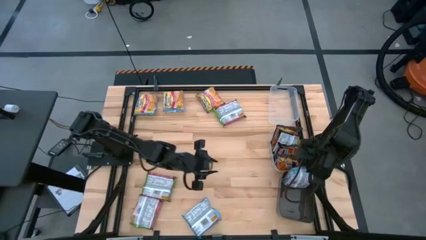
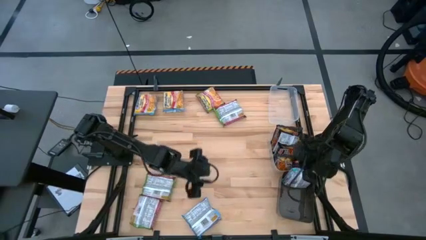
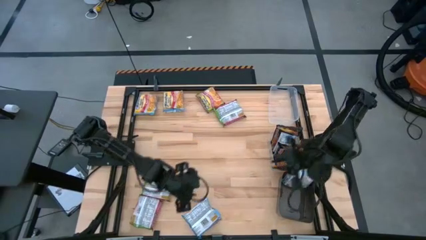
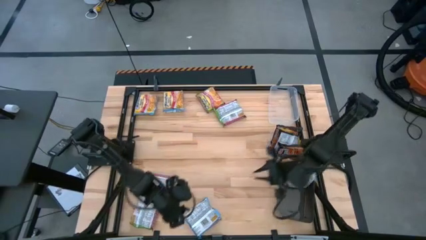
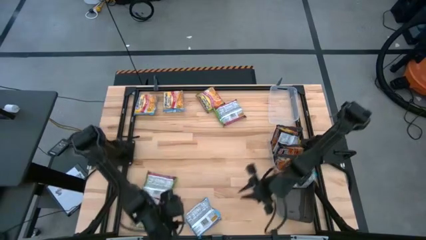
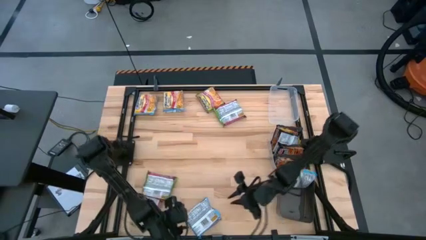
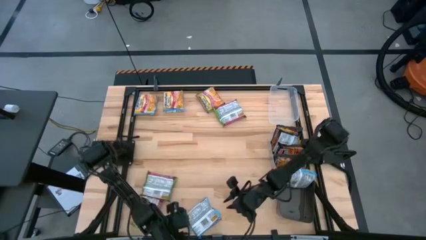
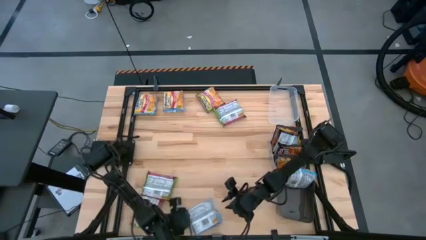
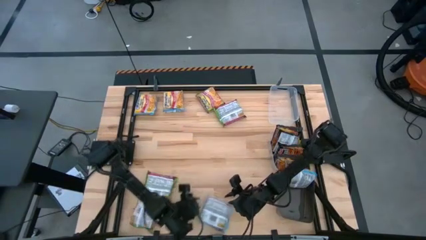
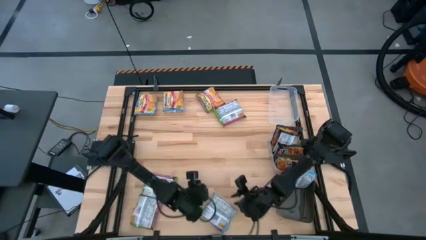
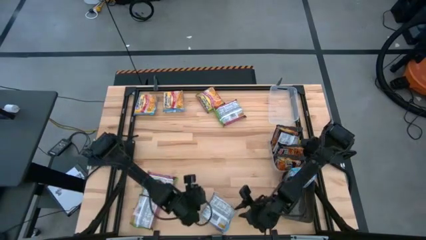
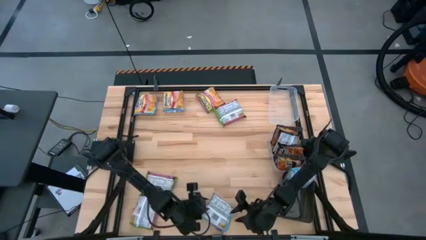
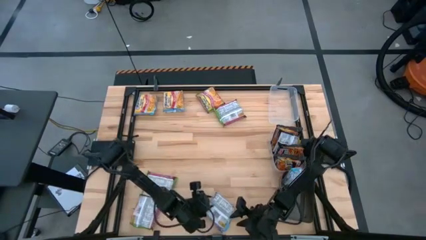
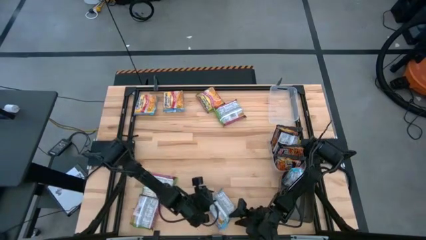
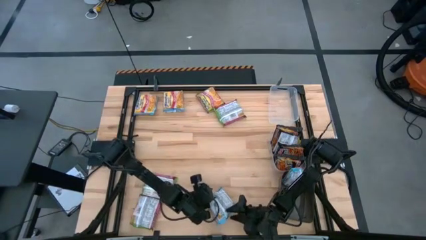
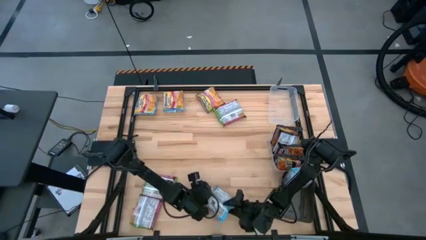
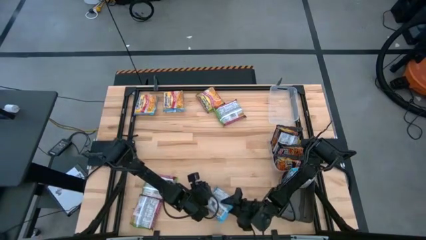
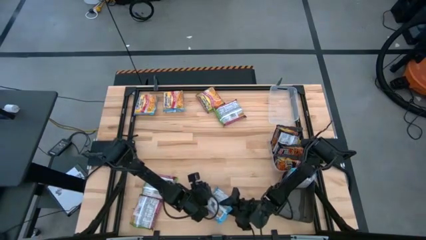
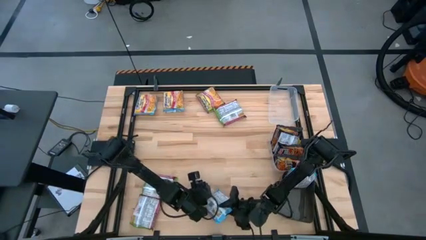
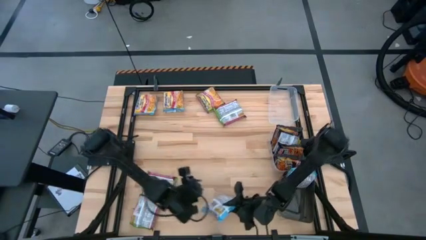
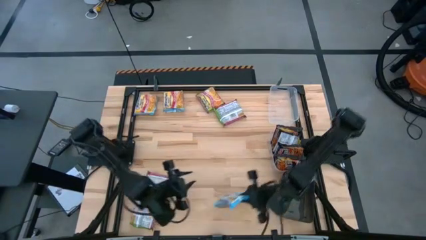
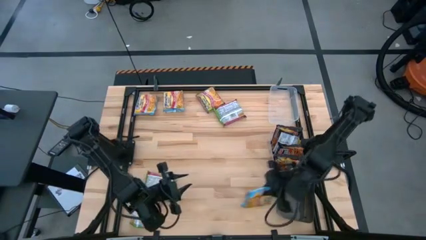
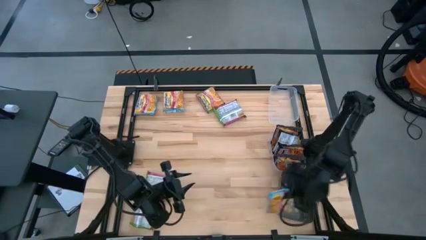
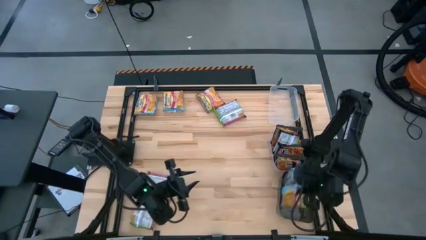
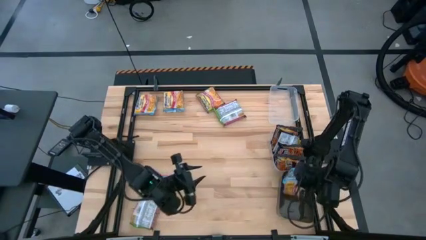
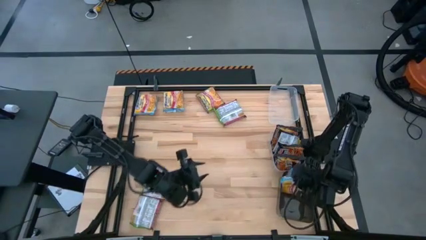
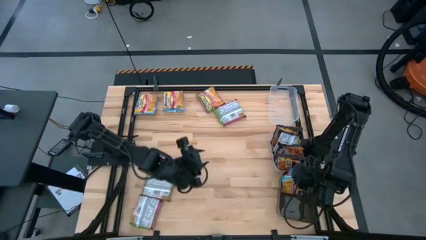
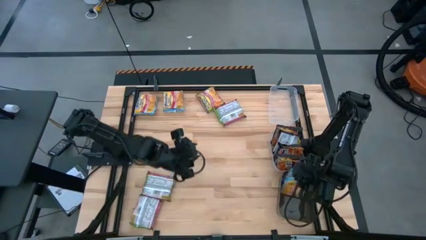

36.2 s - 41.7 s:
Task: Sort Maruchan noodles
Put the blue noodle pack into the black bin

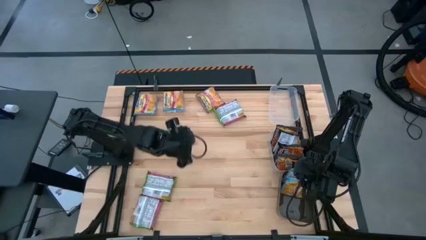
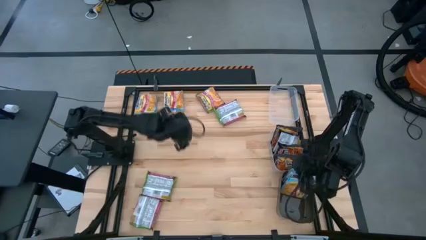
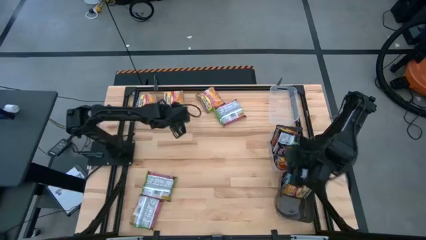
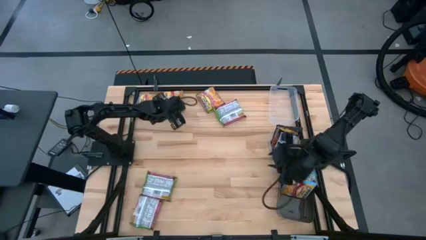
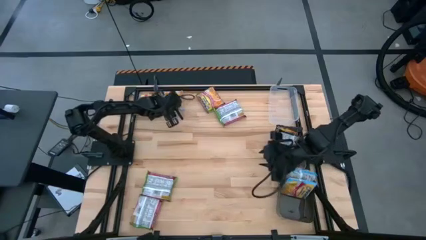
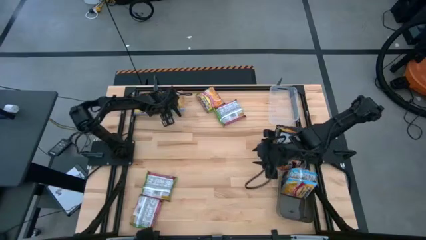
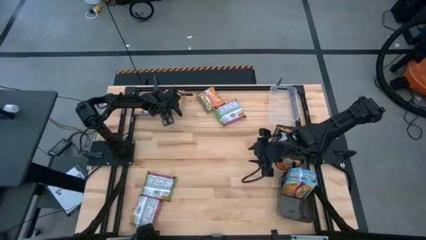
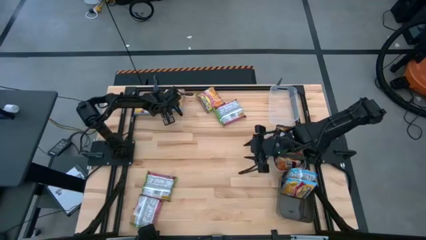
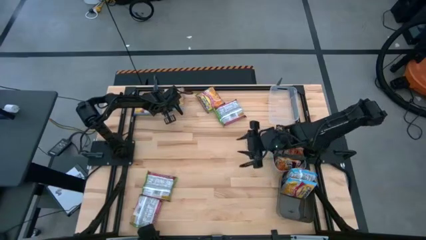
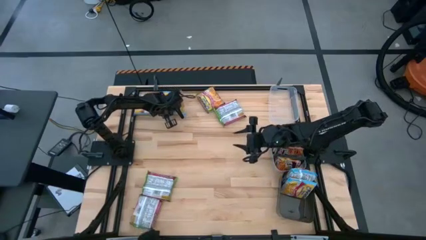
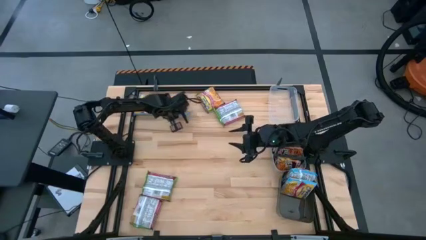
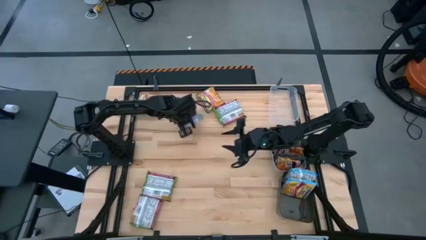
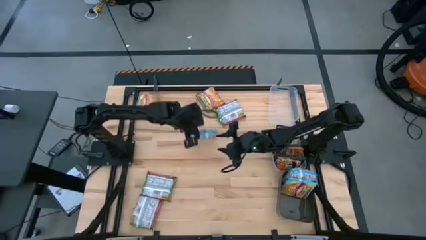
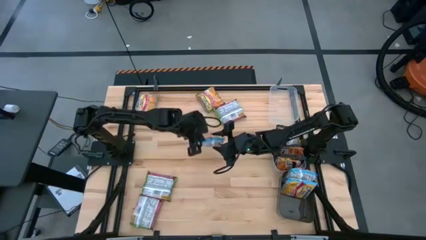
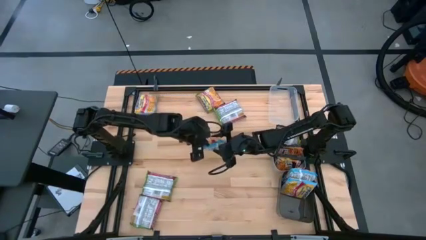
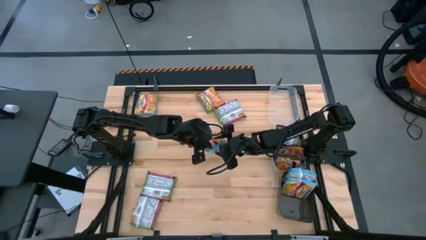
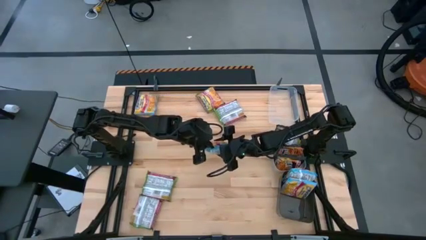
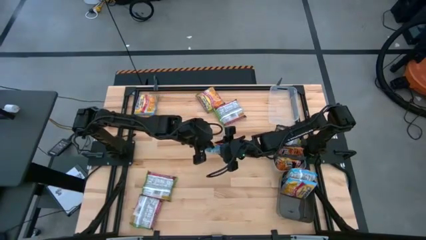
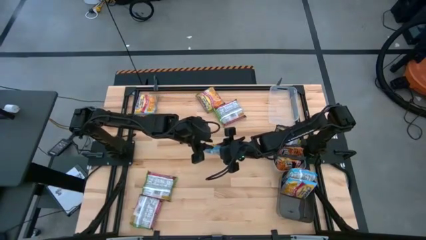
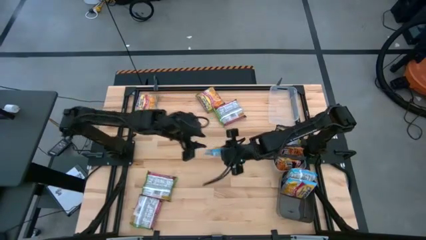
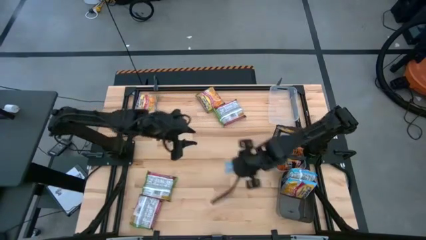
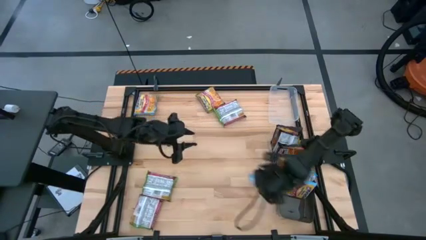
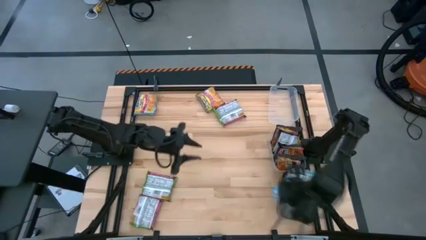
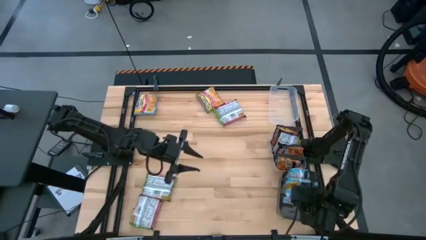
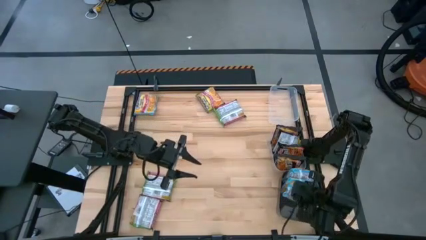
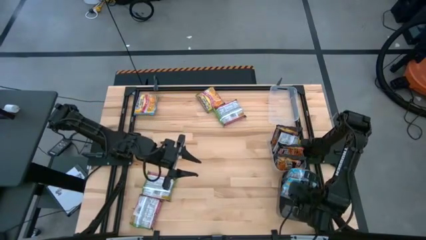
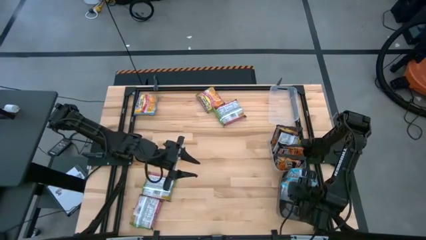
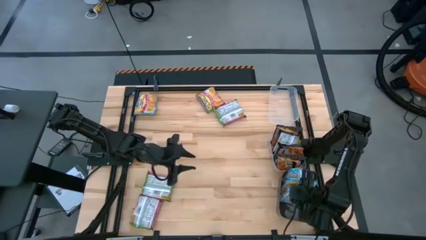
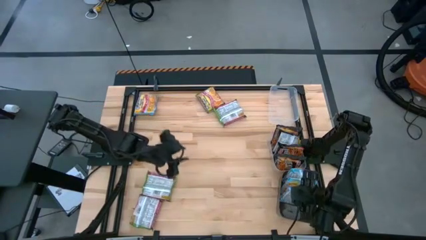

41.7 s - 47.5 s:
Put the blue noodle pack into the black bin

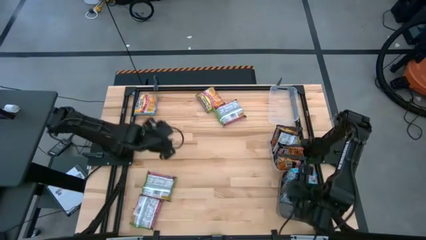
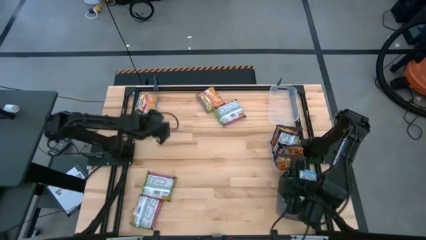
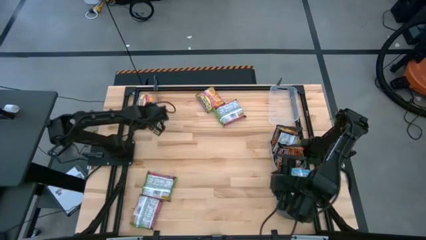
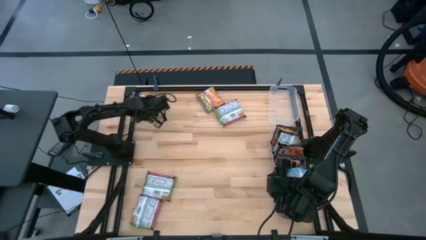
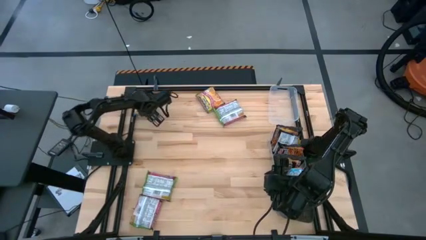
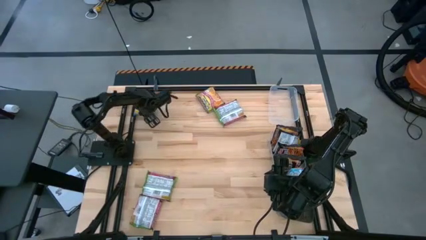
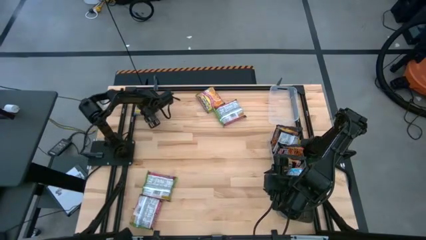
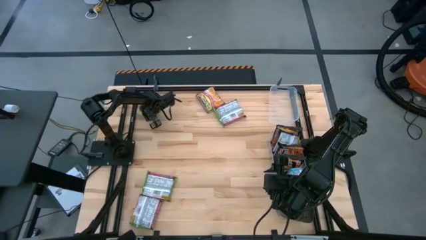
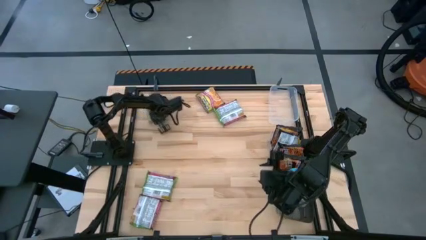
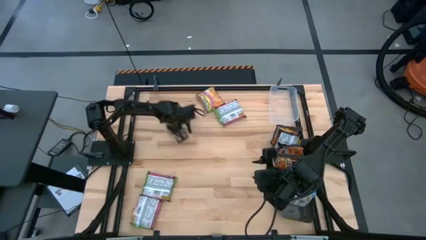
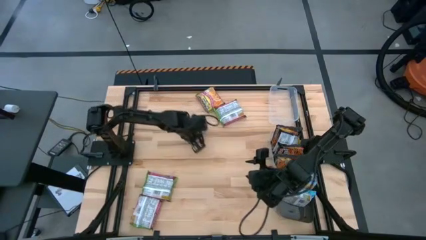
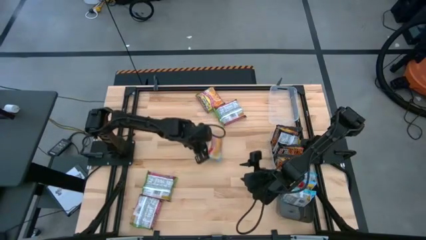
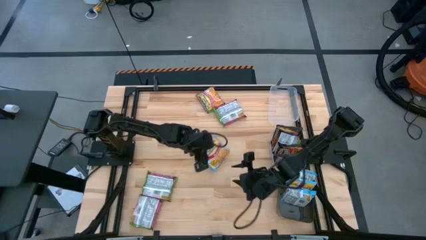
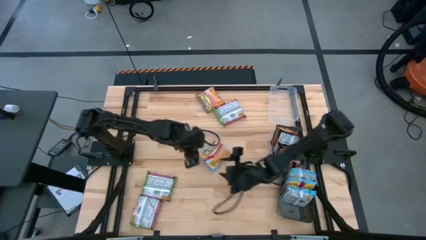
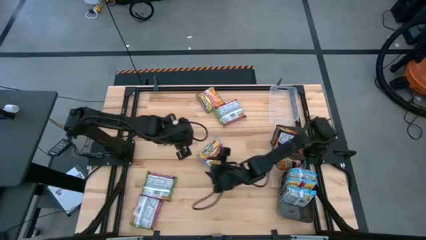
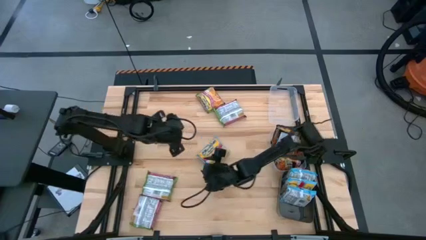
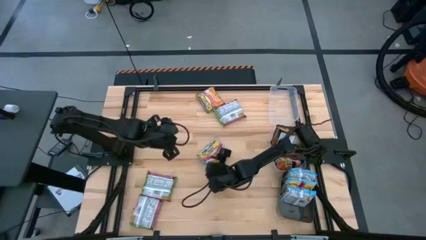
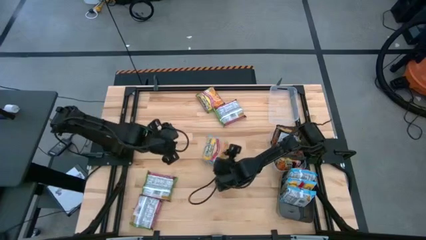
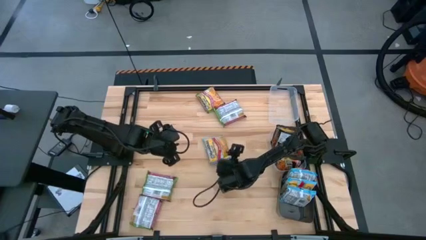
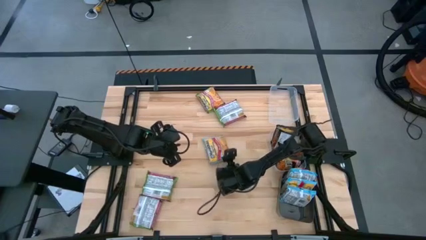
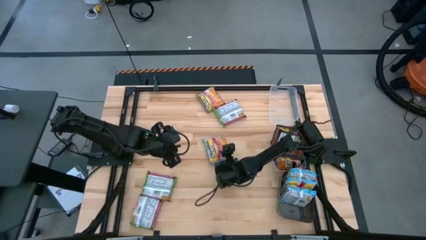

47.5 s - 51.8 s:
Put the blue noodle pack into the black bin

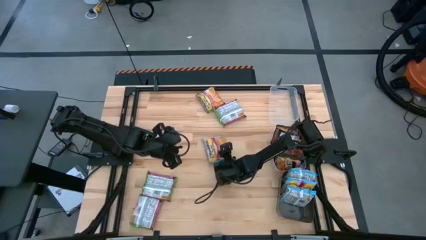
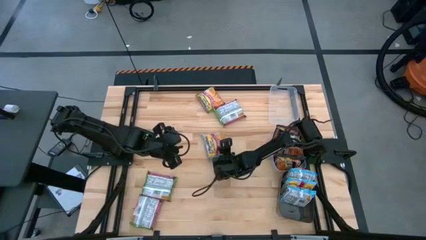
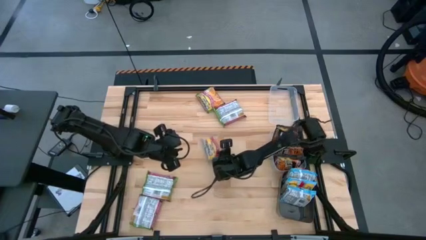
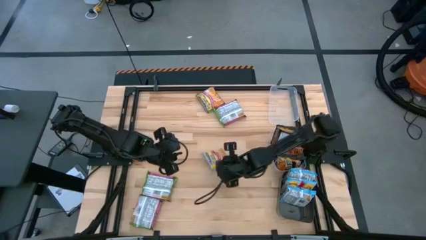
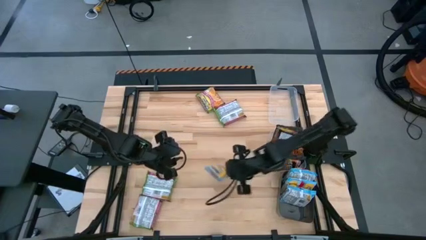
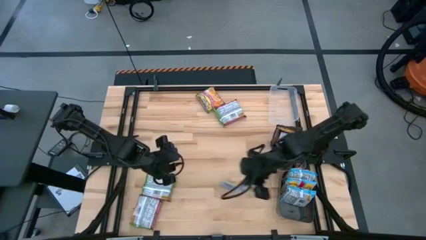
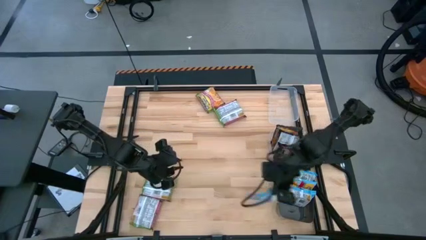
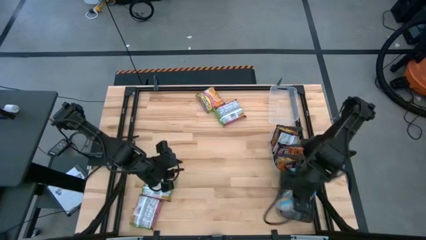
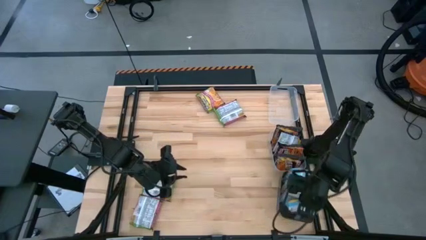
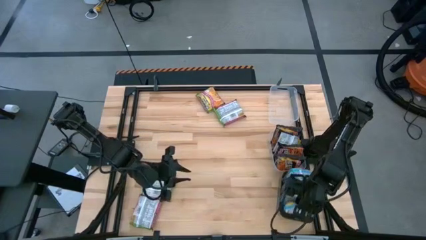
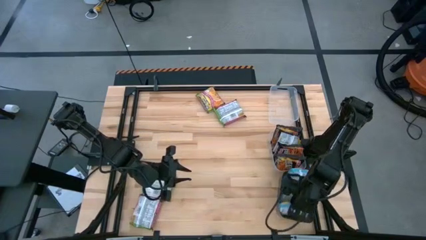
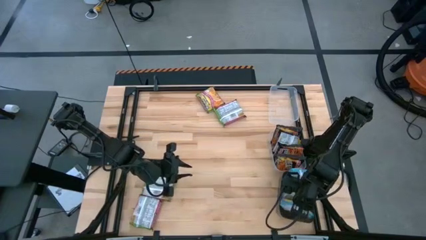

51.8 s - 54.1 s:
Put the blue noodle pack into the black bin
